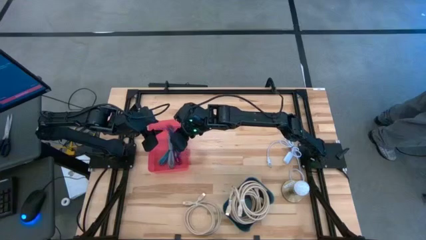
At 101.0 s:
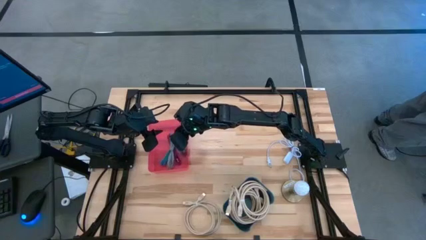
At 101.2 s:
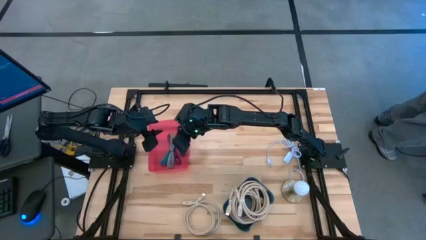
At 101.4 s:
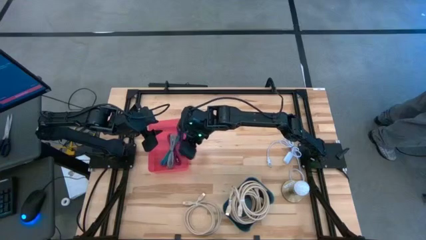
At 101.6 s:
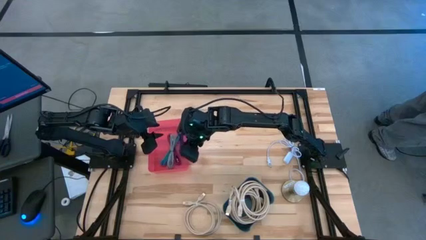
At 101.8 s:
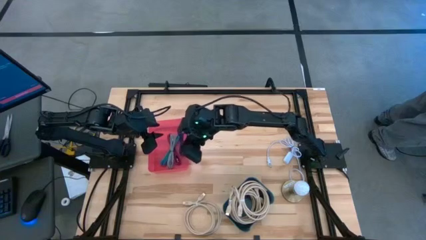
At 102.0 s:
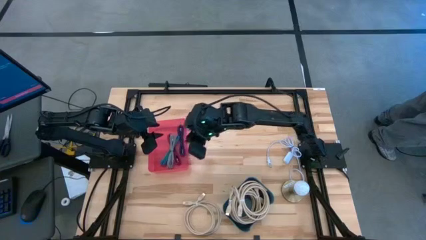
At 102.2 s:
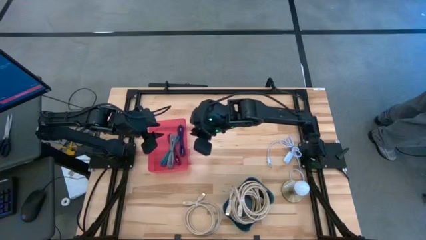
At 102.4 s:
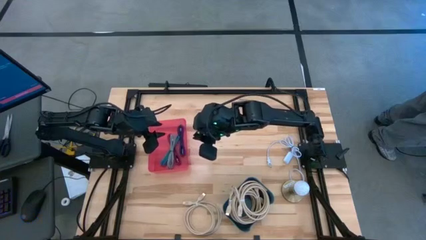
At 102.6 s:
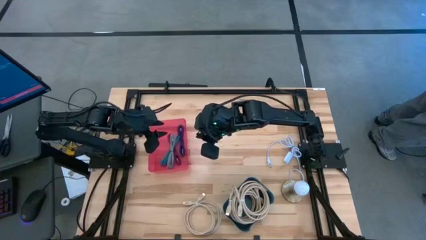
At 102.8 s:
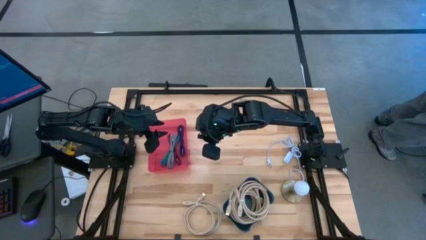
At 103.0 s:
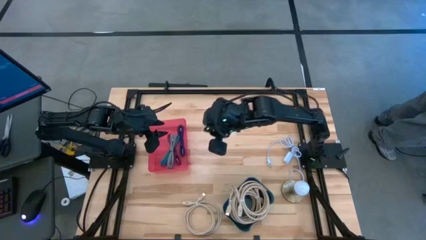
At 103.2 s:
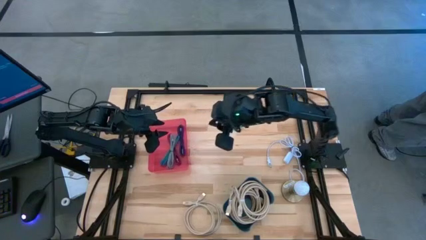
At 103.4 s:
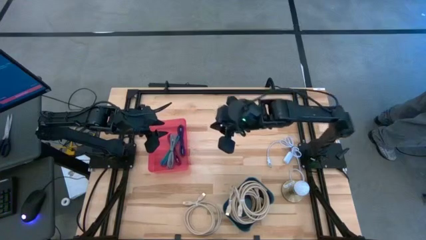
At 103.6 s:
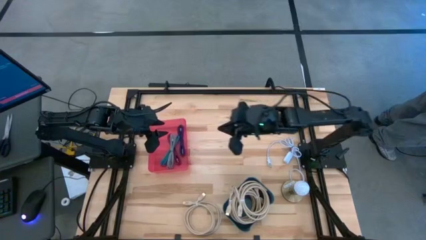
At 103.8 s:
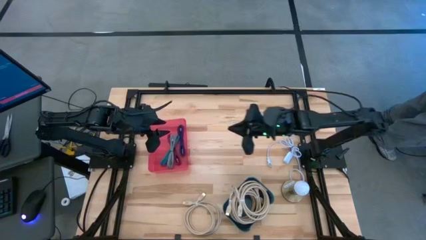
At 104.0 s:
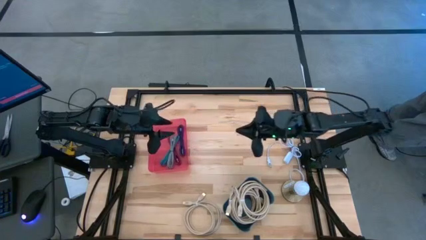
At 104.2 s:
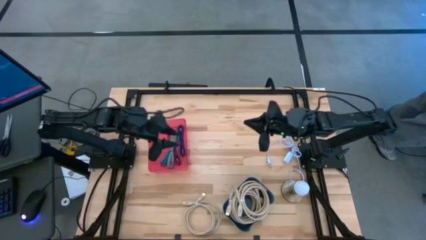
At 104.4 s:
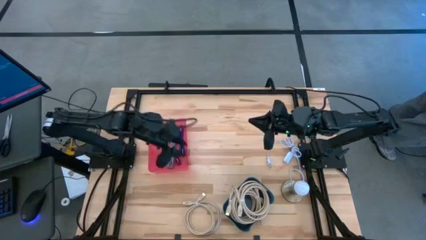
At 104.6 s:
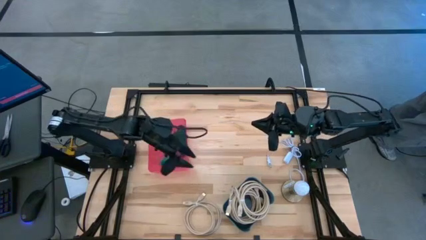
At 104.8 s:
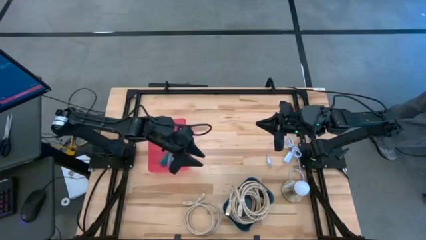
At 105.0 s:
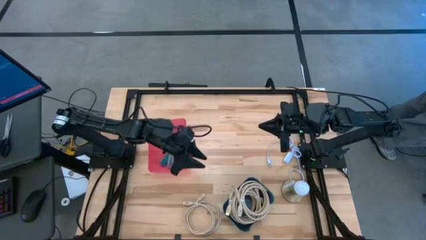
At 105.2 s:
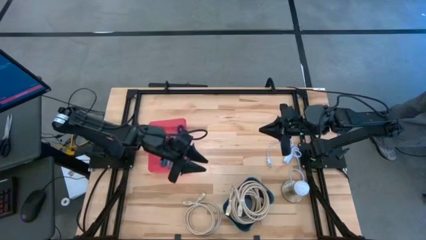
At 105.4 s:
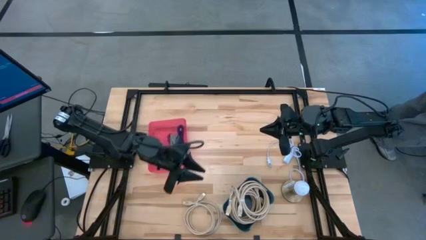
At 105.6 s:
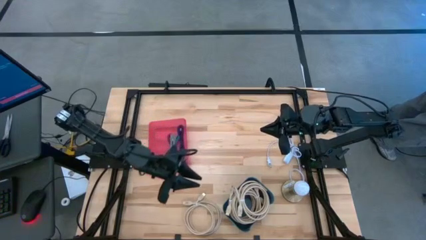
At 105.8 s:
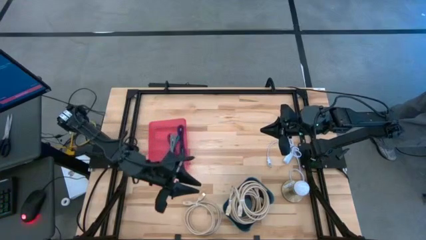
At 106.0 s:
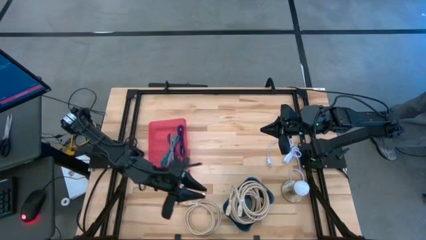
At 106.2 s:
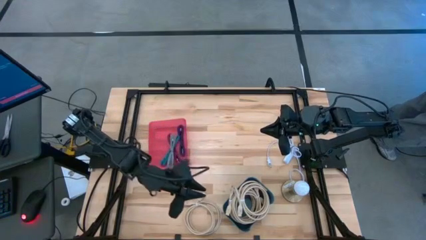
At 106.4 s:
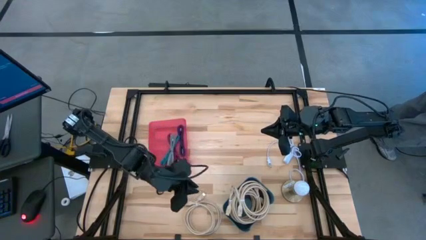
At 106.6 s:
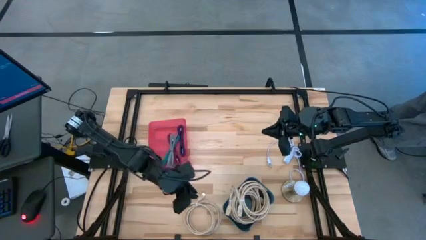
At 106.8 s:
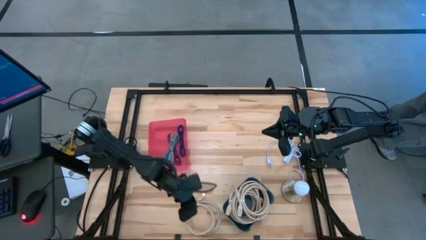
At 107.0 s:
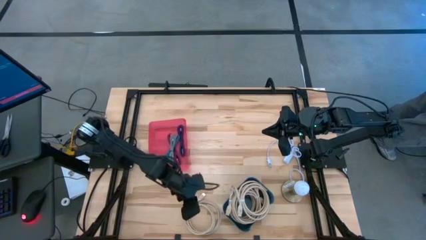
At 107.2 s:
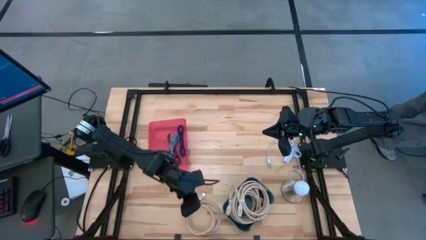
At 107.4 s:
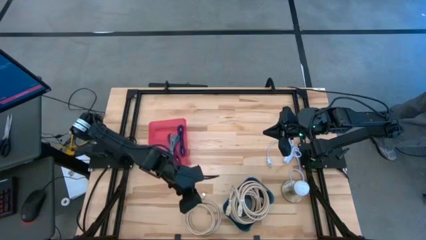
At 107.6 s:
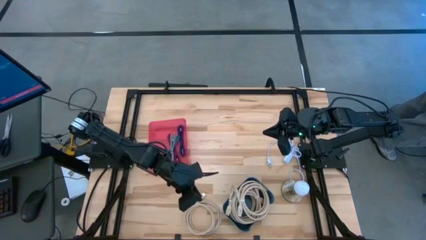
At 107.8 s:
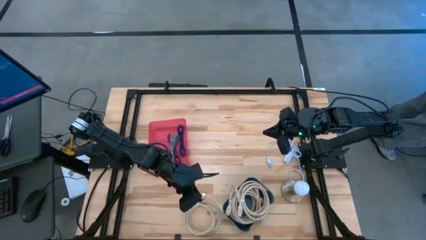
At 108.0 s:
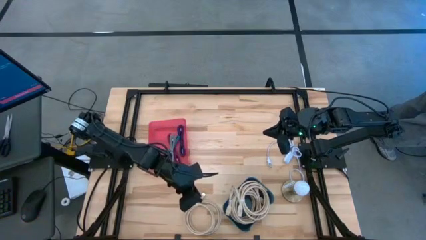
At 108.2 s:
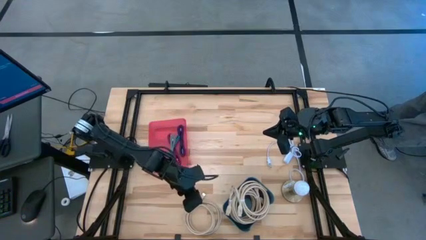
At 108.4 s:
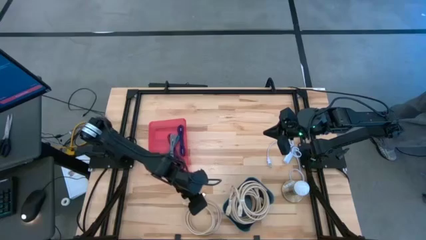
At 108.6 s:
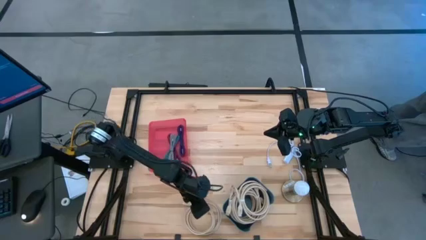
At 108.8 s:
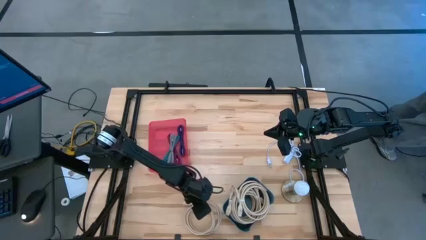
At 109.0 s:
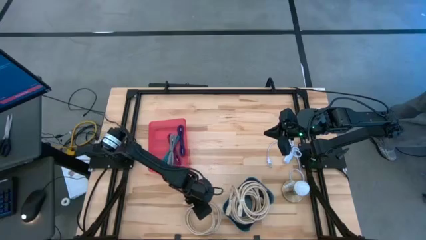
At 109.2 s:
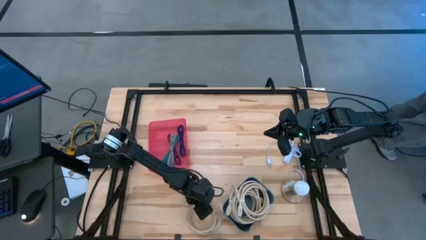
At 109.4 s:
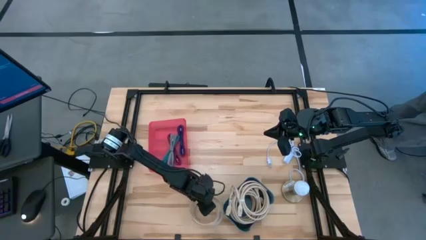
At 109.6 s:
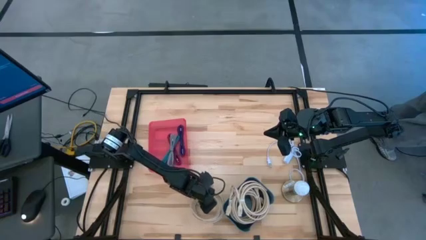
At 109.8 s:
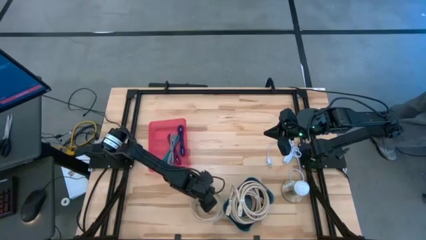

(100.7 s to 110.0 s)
Task: Pick & Place USB Port
Put the white HDMI cable into the blue bin

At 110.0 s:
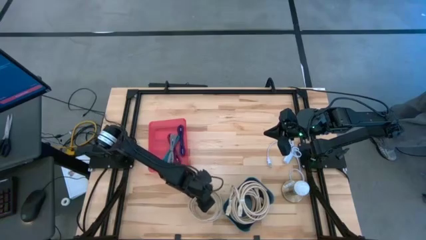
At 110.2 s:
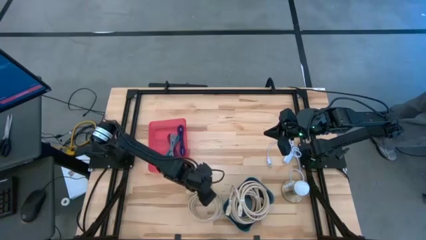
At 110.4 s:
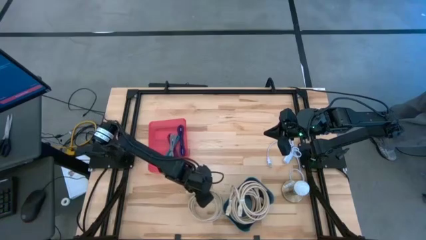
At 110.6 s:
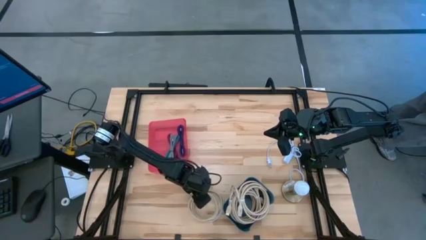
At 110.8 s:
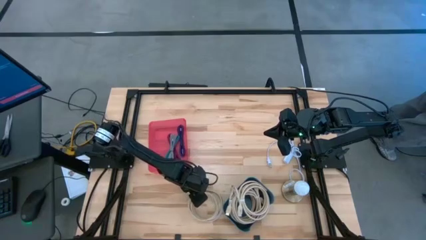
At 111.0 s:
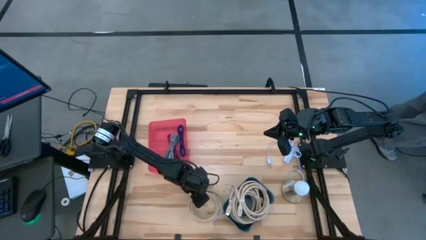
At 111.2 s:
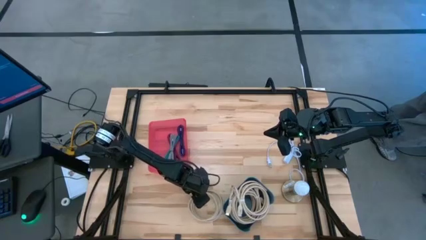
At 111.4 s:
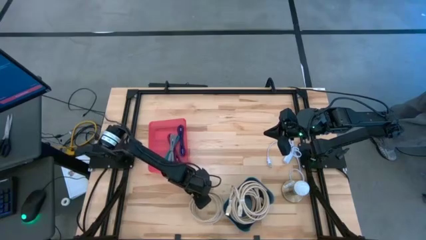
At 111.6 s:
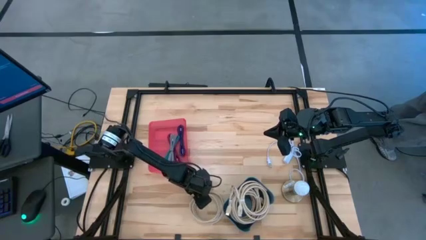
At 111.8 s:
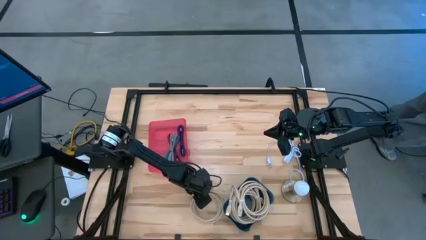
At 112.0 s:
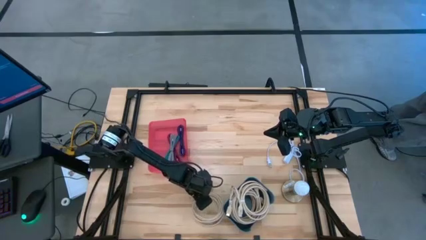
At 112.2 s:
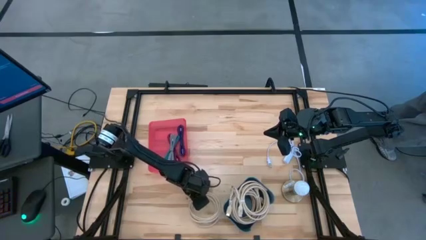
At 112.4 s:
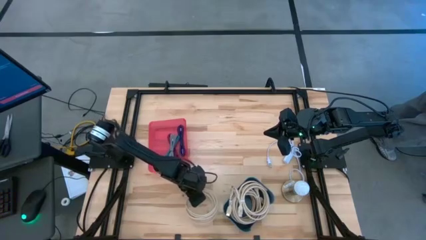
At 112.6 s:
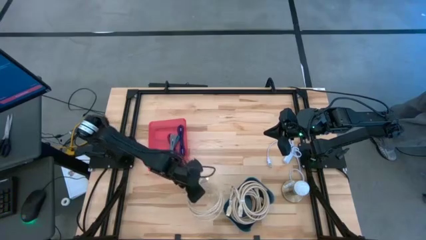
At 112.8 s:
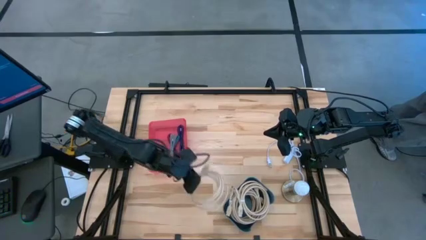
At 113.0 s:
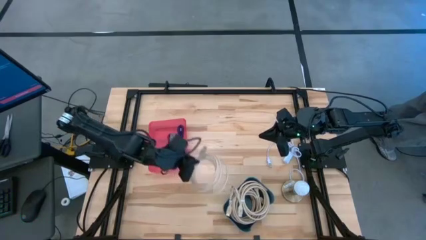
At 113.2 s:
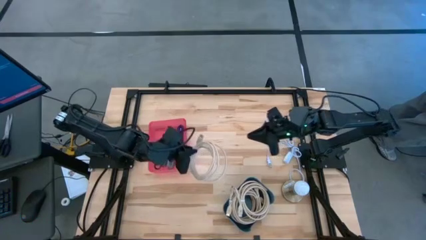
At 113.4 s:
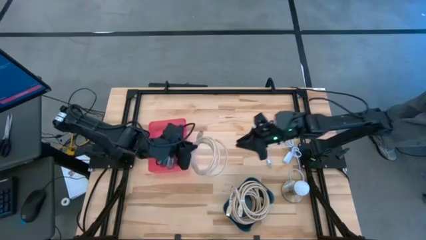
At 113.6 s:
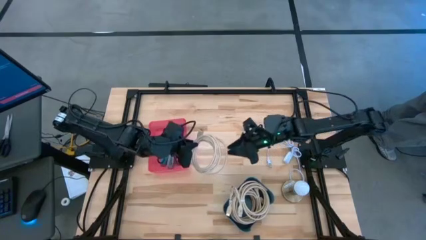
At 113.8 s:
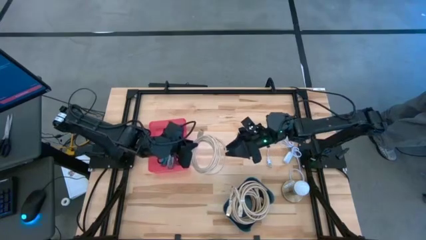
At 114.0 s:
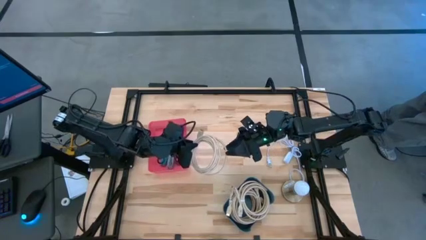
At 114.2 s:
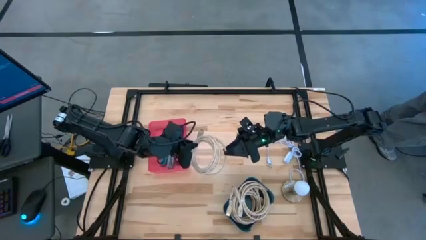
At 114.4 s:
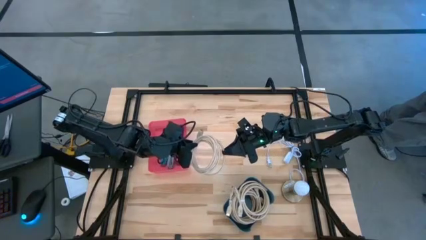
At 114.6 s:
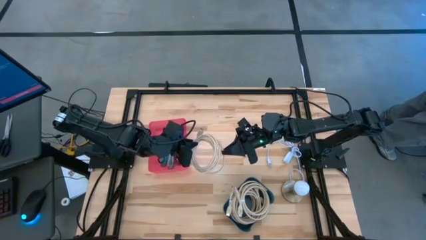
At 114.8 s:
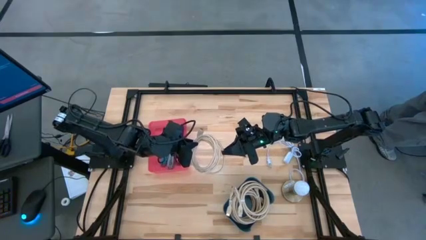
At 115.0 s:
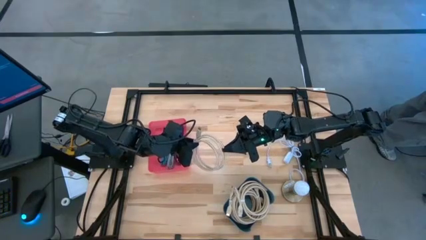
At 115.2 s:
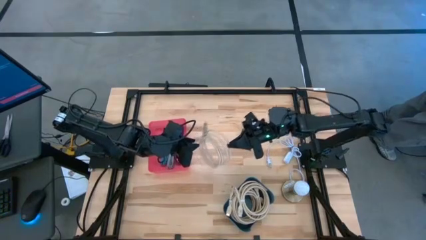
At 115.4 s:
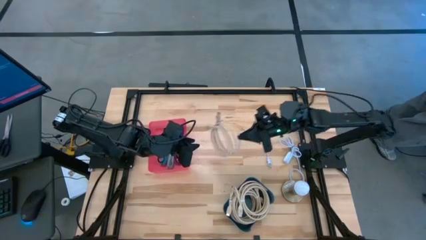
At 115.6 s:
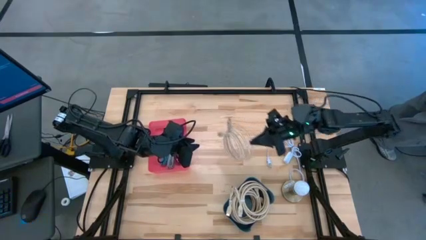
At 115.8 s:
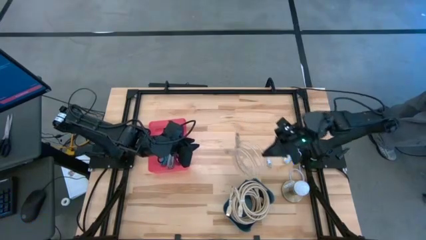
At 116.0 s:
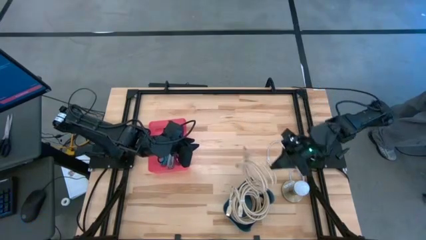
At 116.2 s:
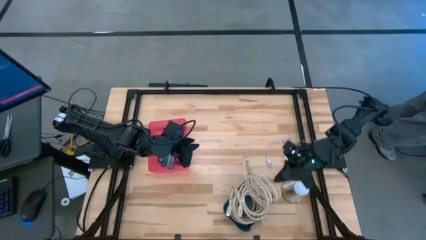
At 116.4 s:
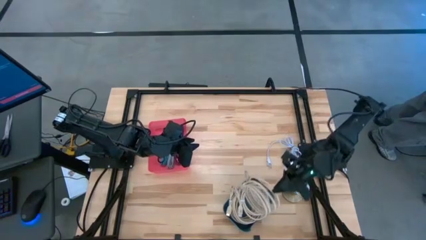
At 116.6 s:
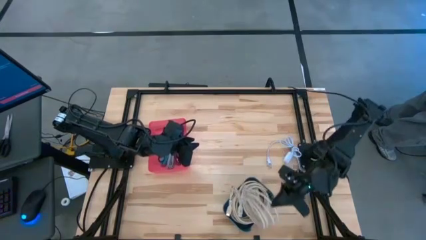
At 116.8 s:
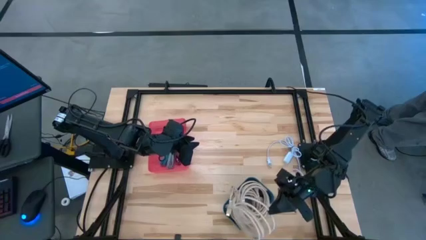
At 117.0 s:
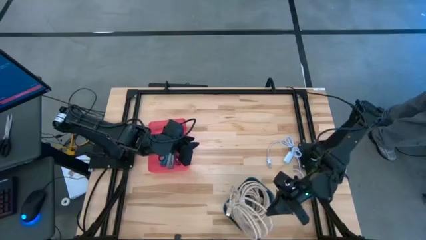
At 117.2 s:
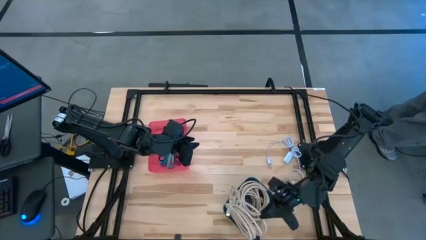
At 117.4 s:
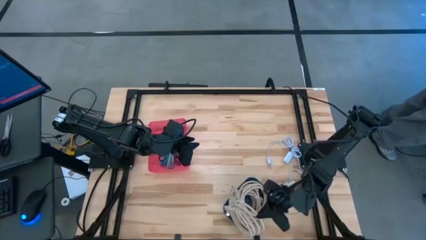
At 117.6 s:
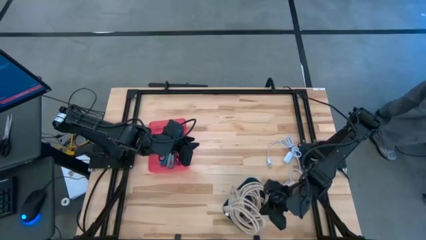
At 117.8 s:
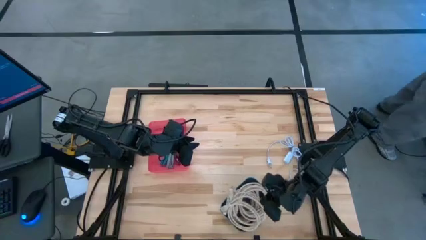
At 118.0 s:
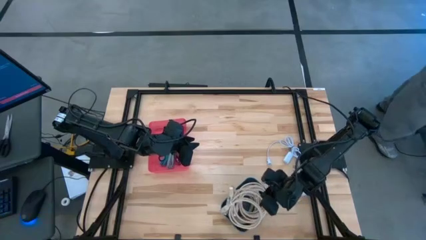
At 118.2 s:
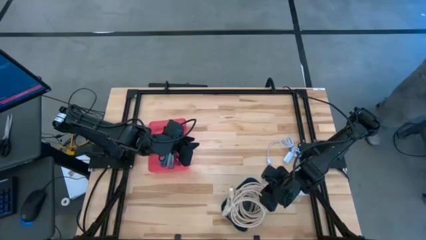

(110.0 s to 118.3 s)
Put the white HDMI cable into the blue bin
